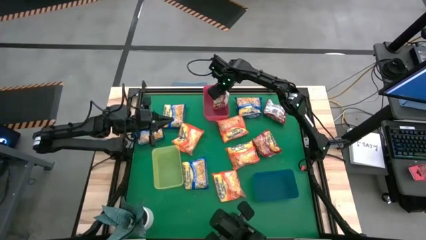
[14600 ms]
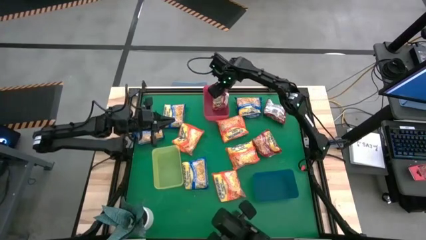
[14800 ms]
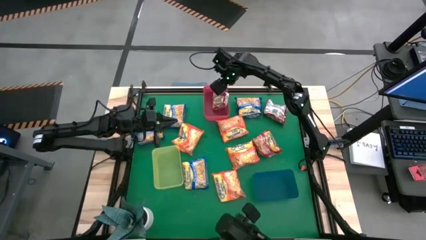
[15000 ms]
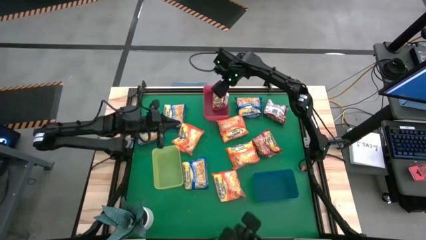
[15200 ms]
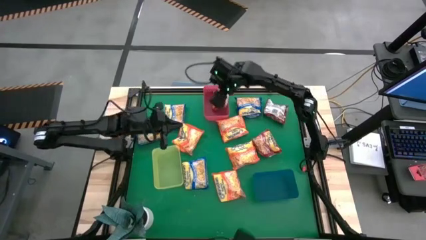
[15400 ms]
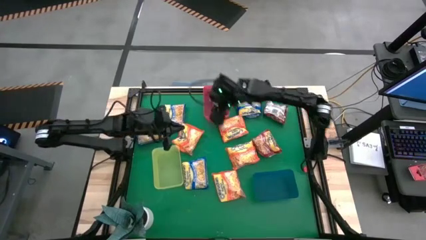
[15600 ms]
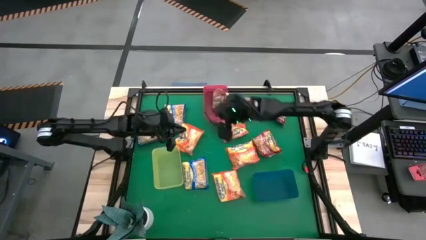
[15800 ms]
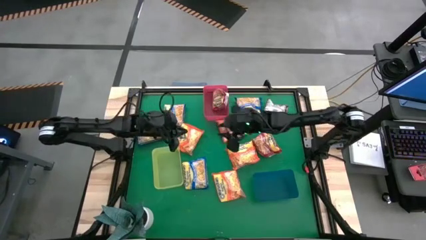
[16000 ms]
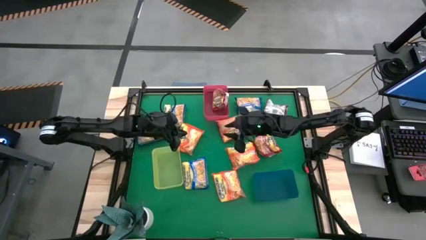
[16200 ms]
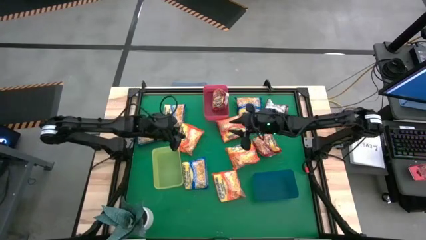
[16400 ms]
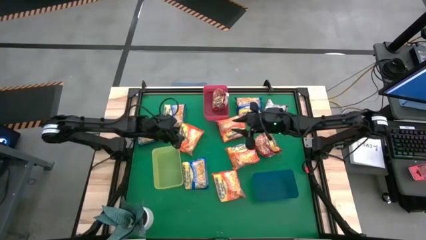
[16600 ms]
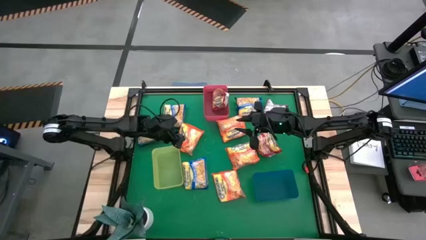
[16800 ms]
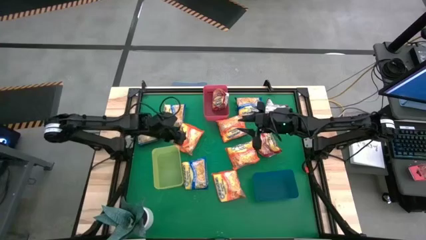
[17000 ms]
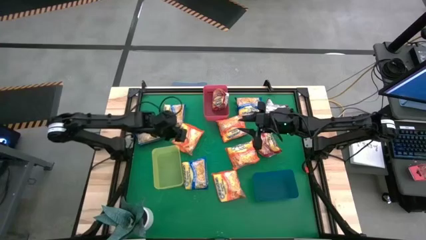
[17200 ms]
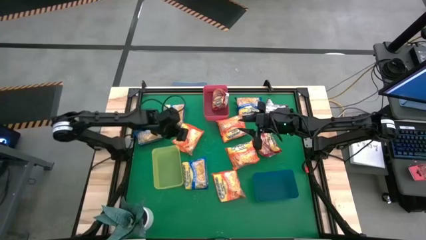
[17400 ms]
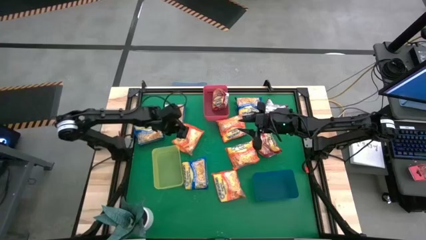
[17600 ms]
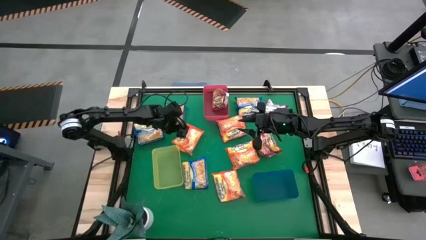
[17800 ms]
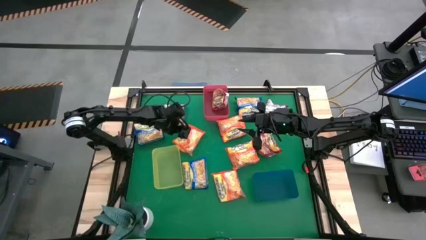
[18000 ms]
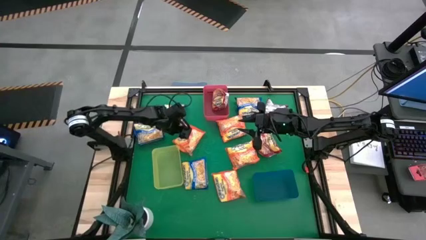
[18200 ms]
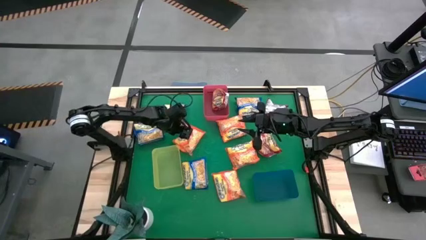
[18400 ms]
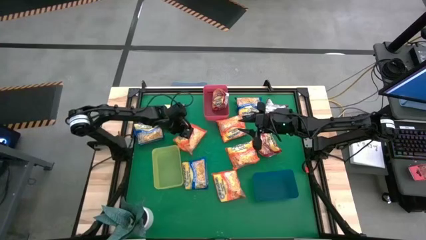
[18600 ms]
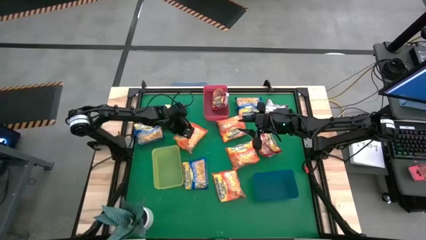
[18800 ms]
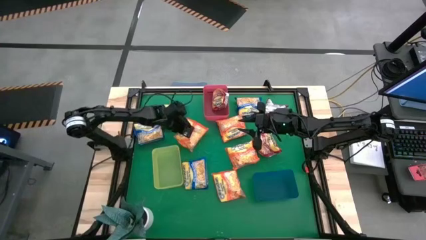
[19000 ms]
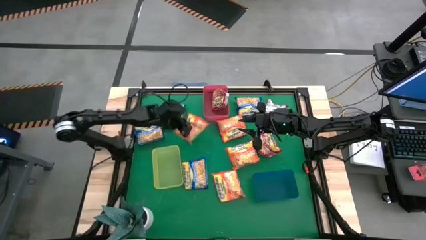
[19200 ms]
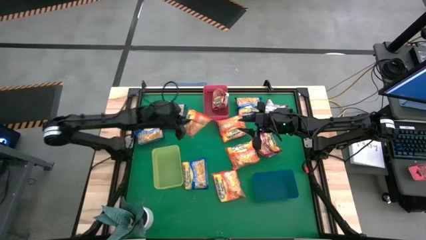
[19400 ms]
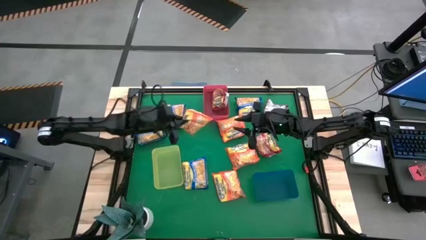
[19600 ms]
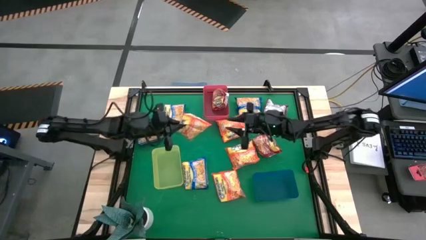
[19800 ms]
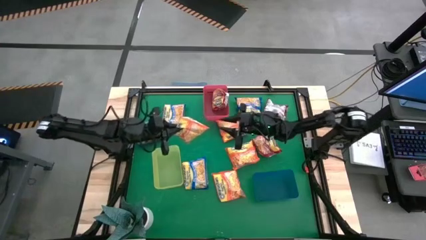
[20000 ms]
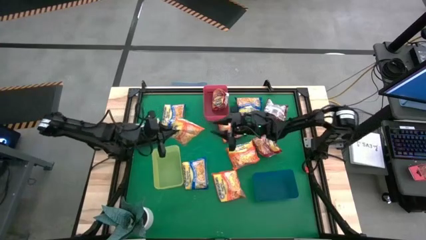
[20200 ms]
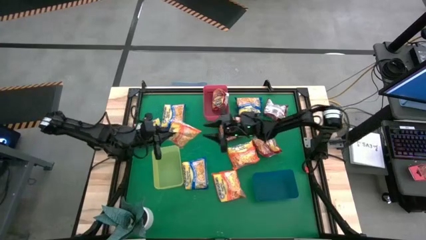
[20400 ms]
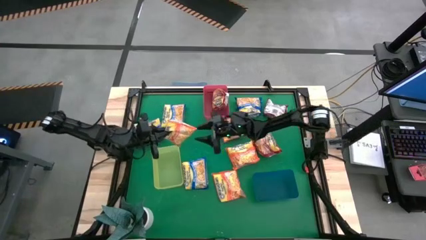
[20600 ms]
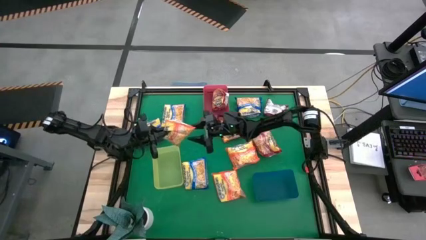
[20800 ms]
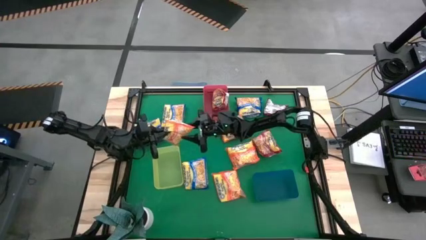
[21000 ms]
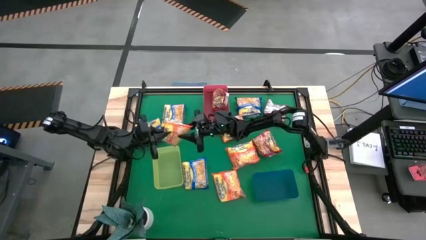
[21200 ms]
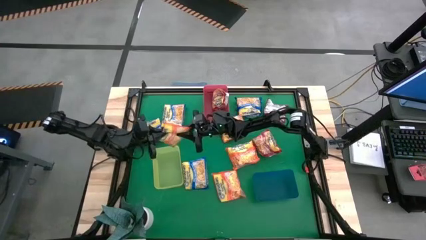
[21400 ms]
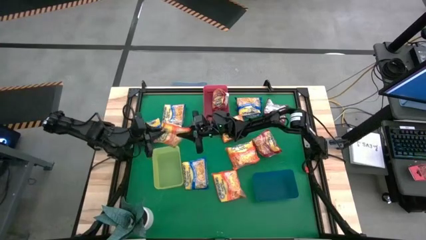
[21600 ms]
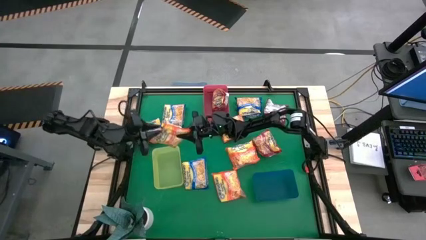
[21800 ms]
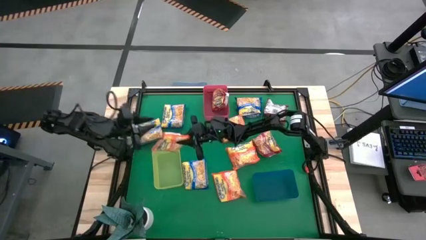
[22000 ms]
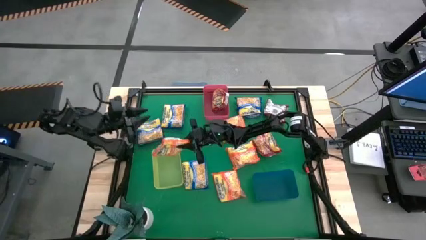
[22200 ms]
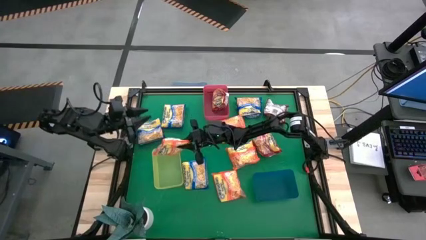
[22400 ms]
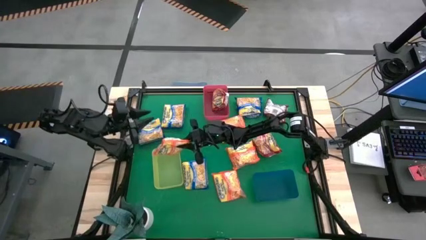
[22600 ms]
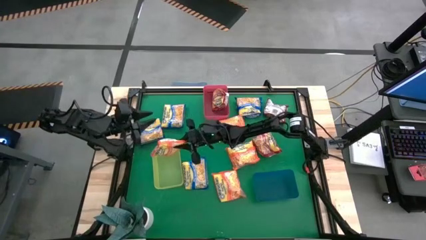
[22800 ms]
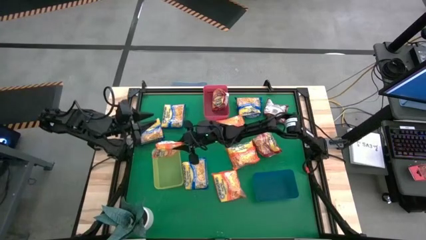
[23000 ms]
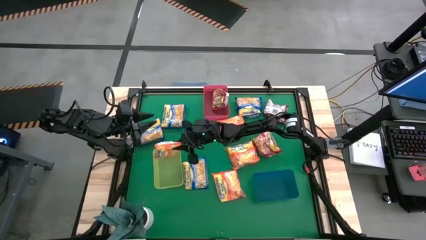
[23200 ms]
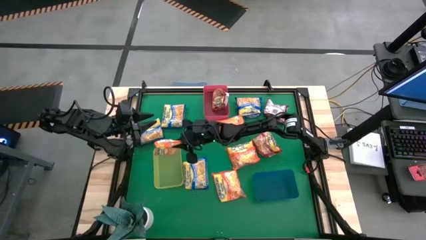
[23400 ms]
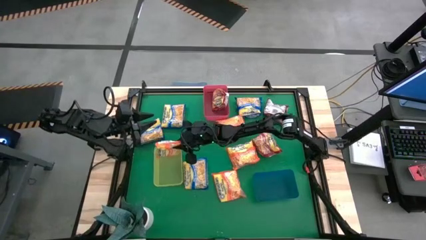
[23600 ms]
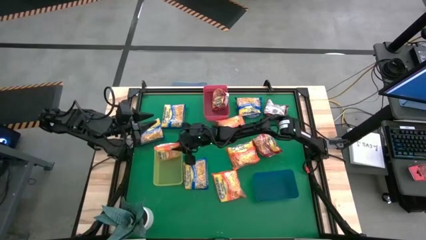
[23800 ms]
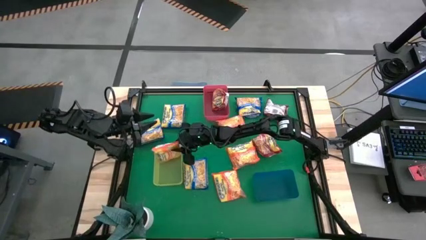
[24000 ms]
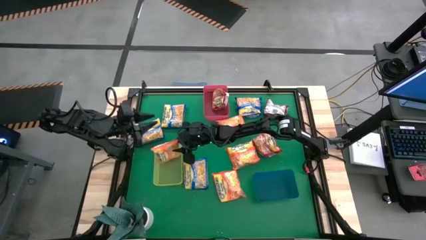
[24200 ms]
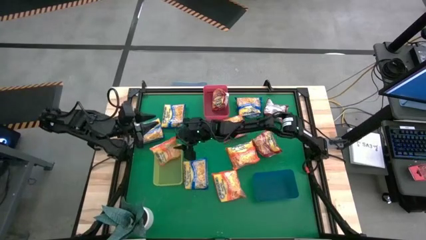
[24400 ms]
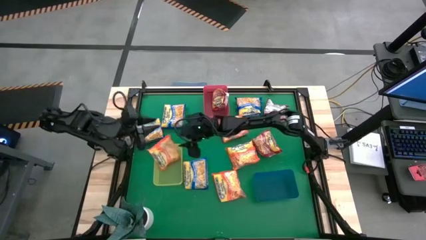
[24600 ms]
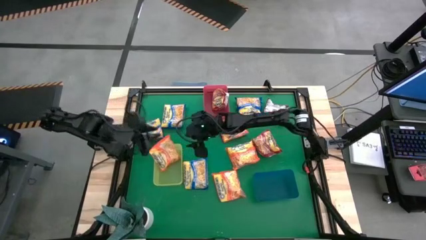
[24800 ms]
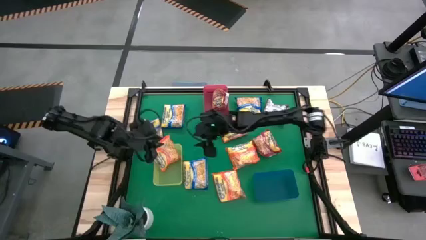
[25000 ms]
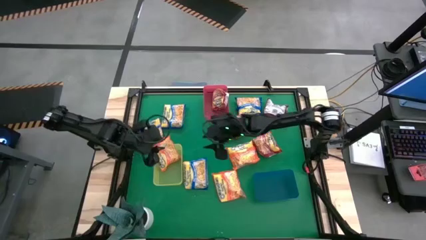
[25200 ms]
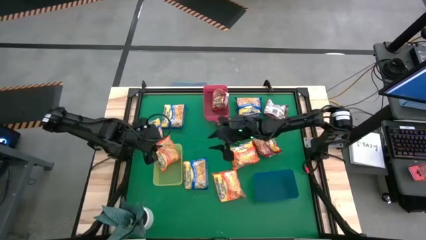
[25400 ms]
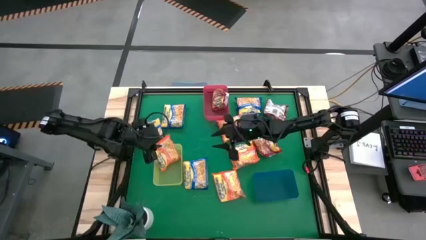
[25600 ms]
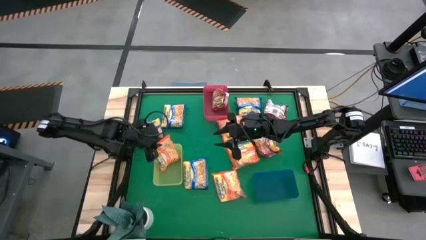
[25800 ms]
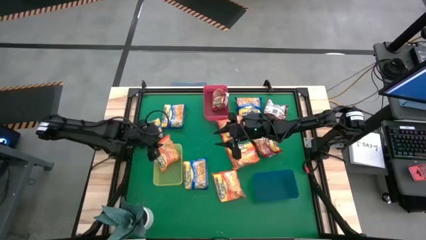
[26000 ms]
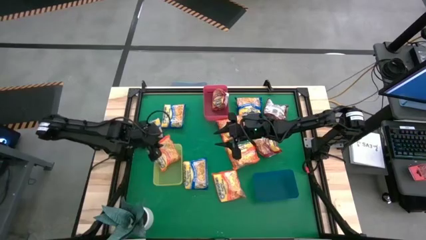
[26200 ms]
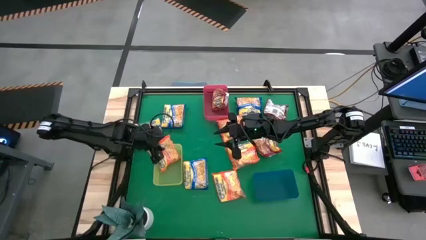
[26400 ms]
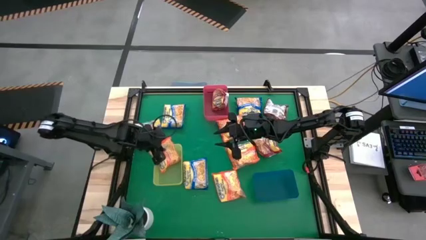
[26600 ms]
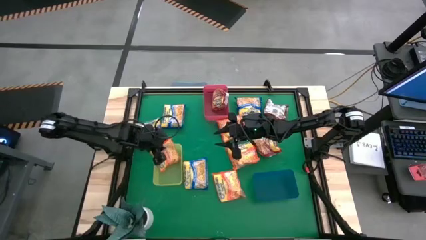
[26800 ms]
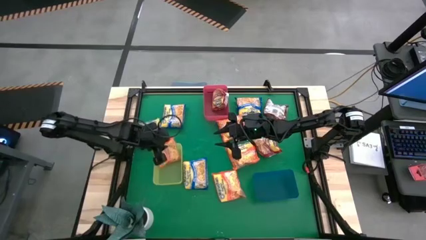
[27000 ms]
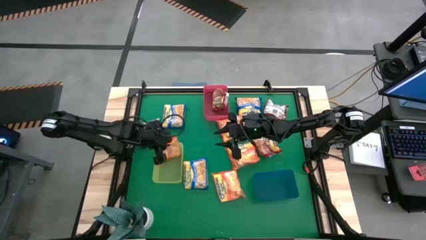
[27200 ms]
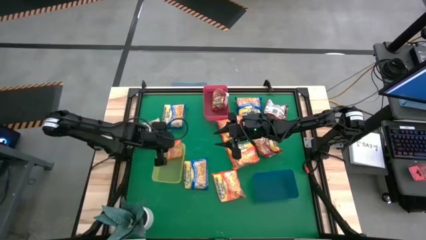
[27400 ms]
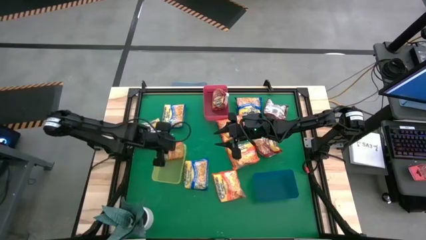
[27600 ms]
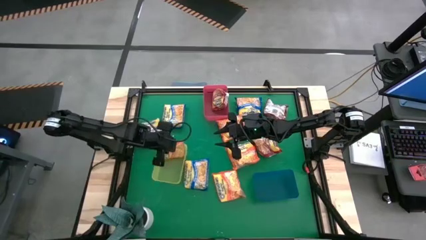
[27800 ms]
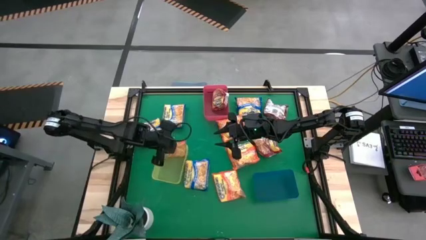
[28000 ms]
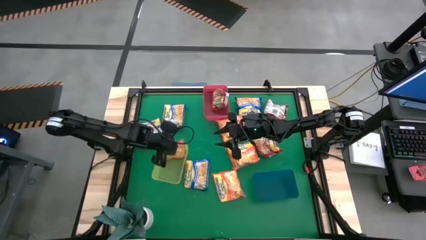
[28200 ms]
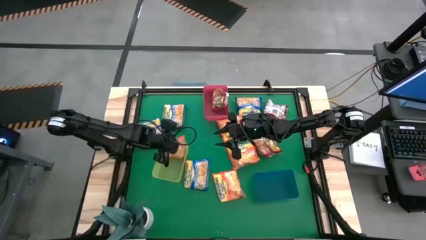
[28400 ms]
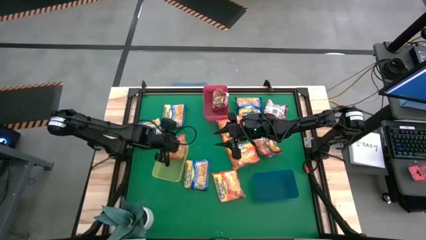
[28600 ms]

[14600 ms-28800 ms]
Task: Sort Maruchan noodles
Put the orange noodle pack into the yellow bin

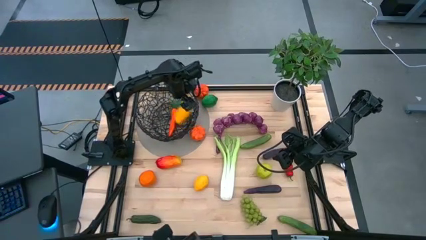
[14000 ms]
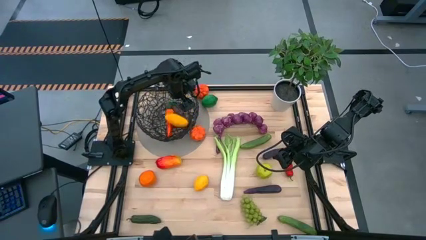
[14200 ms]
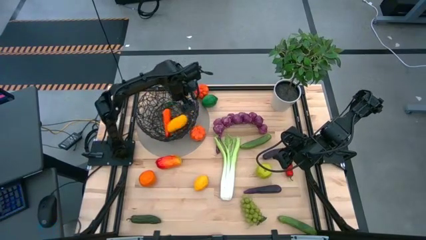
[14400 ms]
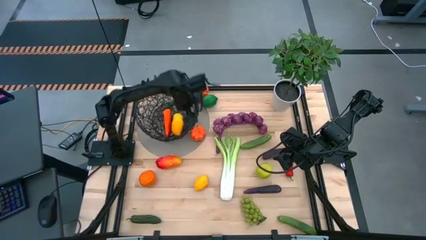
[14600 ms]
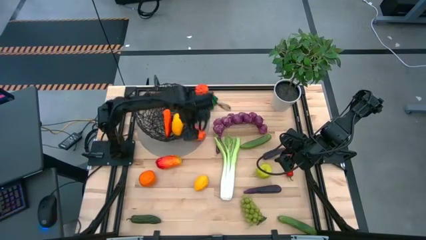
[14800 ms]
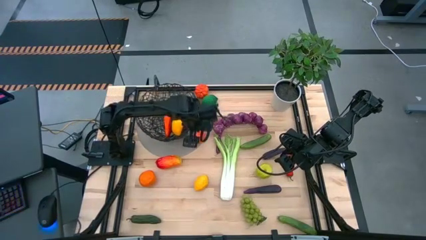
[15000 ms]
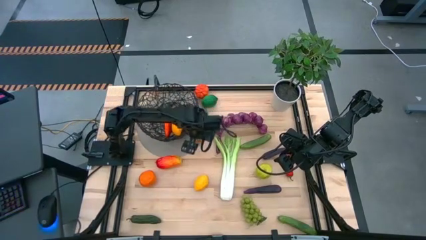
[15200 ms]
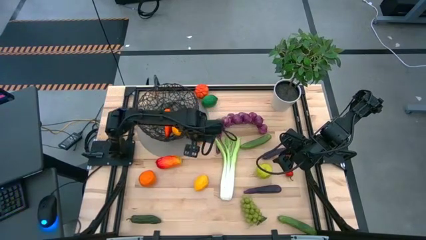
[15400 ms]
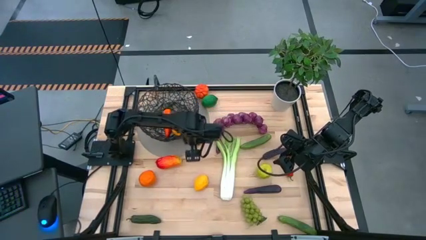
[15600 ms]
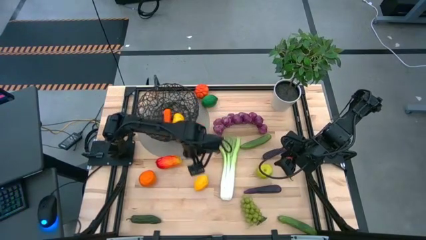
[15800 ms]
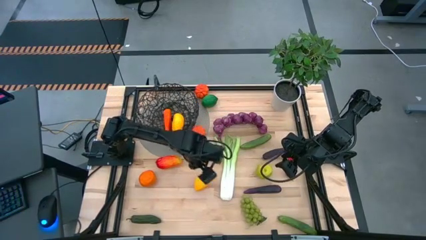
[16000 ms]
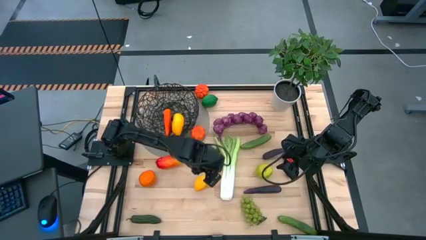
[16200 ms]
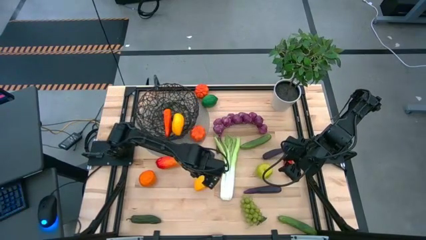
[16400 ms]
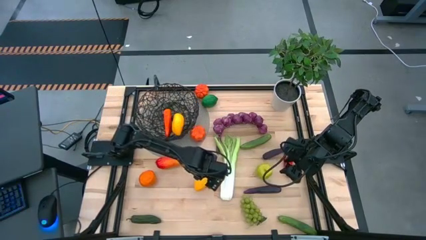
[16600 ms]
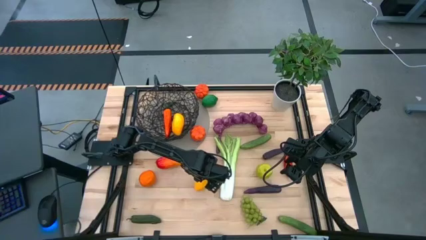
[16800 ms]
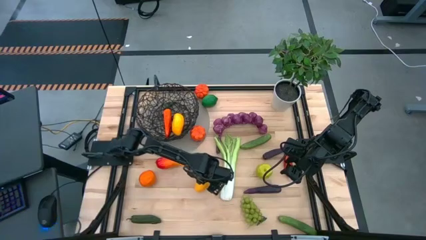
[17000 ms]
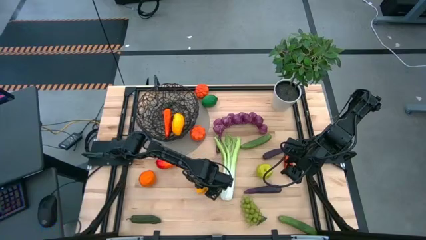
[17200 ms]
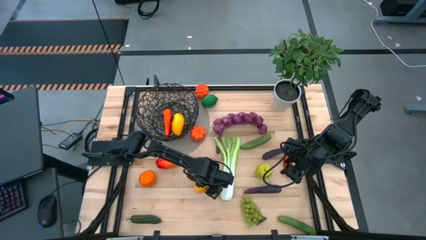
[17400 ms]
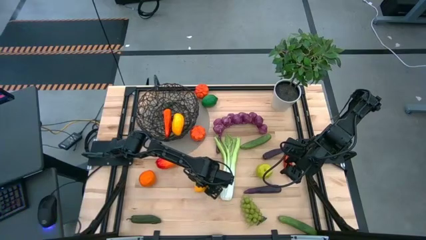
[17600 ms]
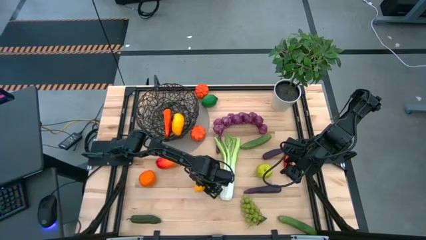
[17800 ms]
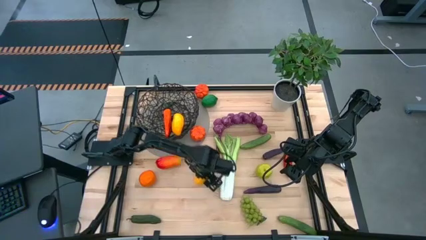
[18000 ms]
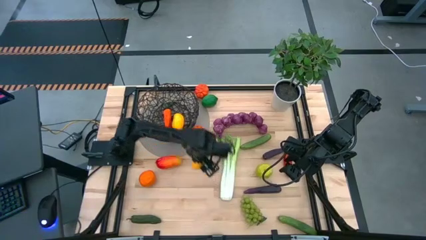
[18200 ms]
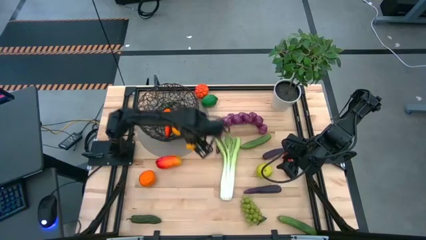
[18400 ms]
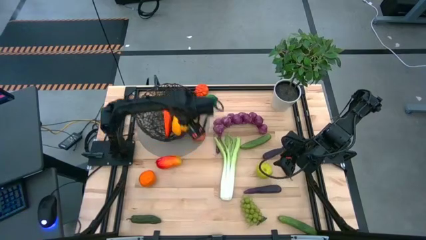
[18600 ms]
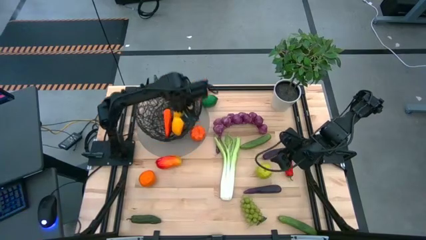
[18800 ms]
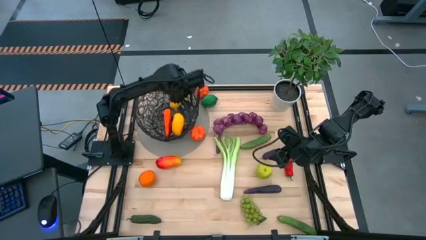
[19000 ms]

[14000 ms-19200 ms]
Task: Build produce basket
Put the yellow lemon into the wire basket
